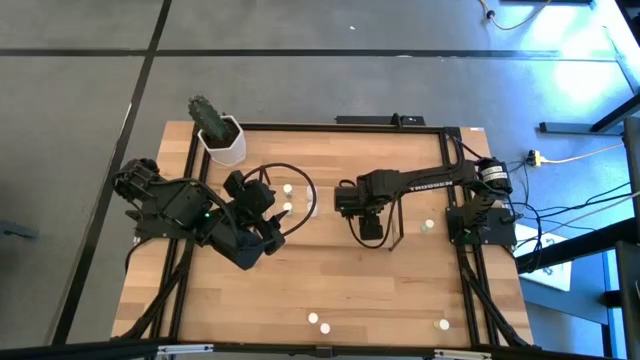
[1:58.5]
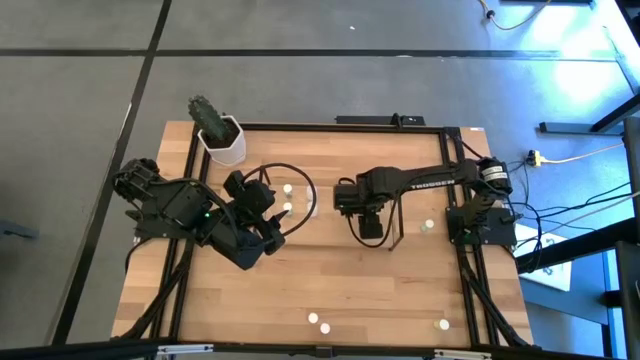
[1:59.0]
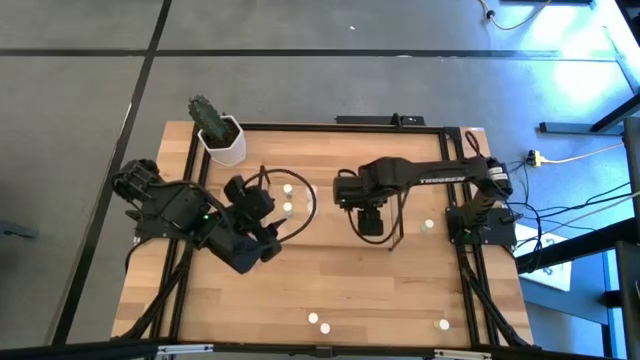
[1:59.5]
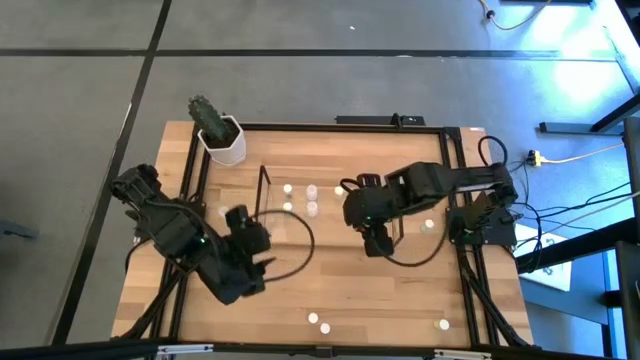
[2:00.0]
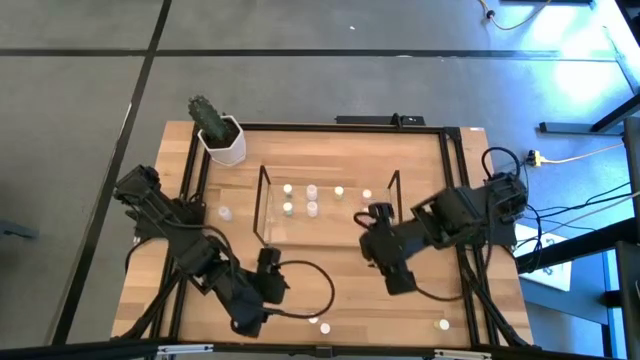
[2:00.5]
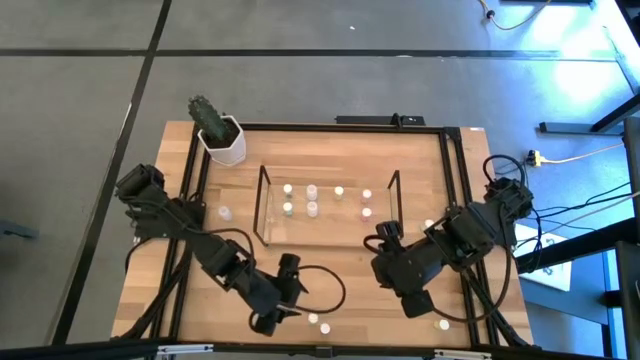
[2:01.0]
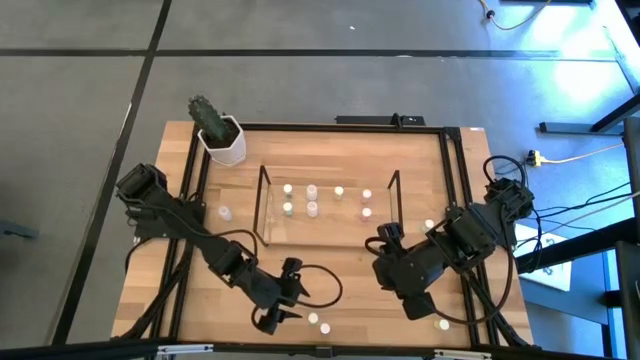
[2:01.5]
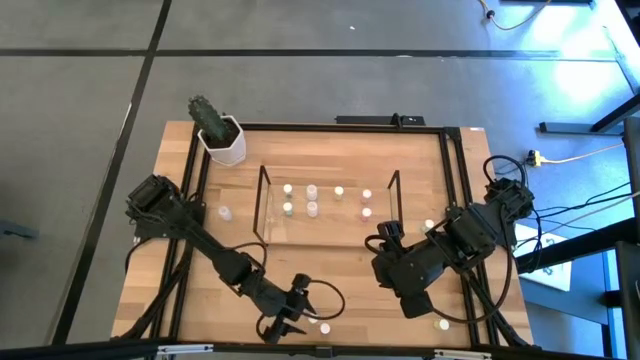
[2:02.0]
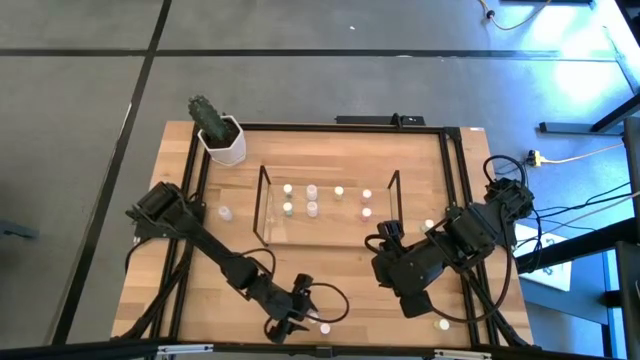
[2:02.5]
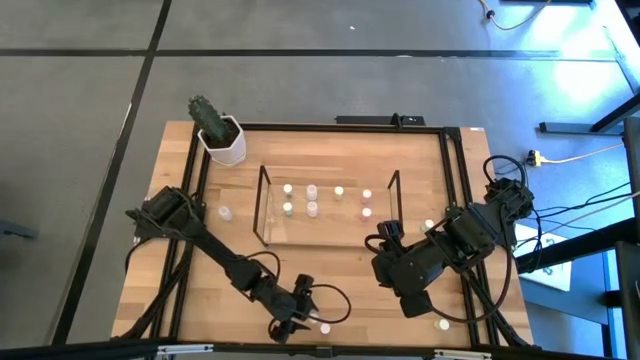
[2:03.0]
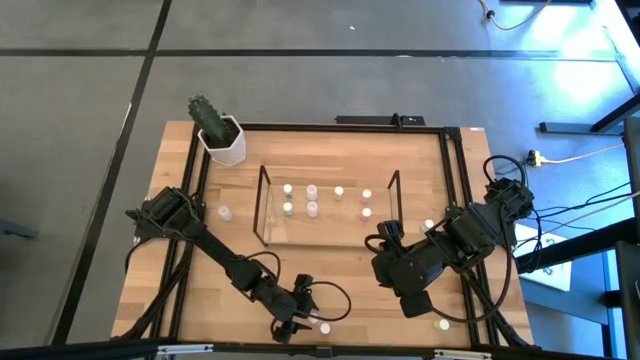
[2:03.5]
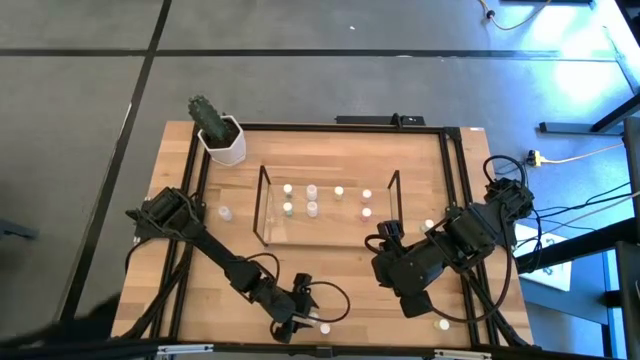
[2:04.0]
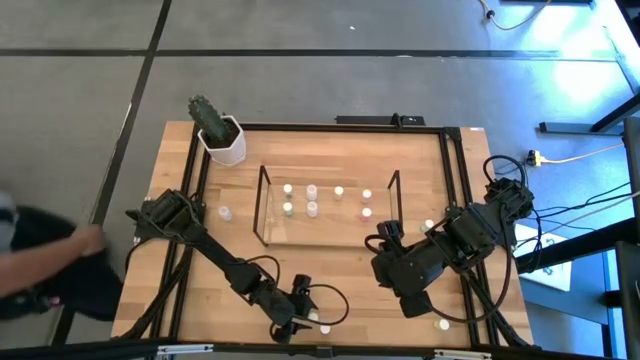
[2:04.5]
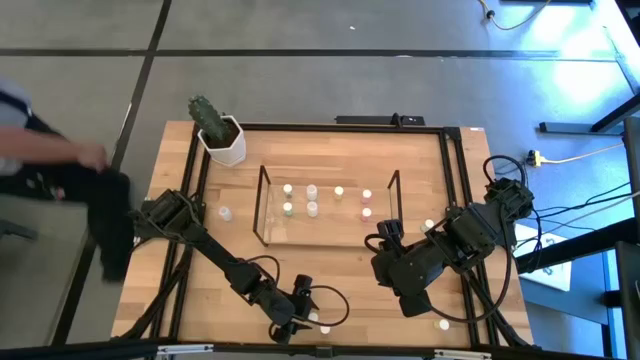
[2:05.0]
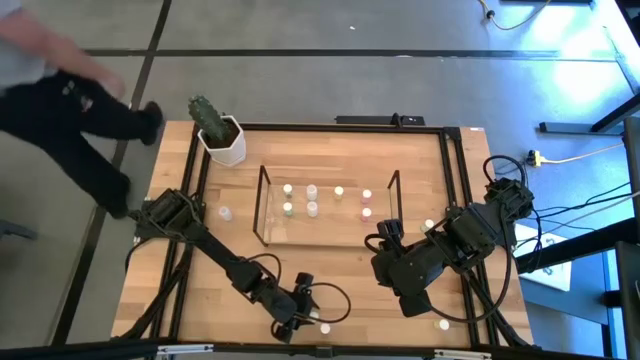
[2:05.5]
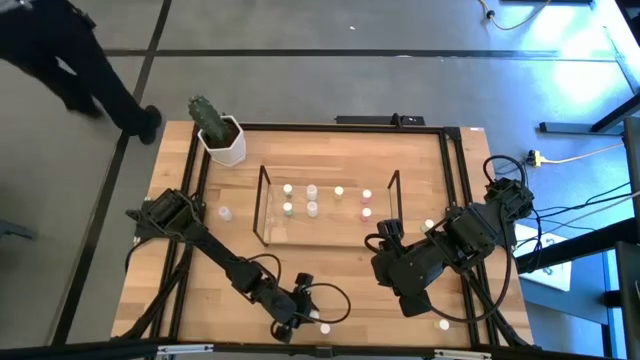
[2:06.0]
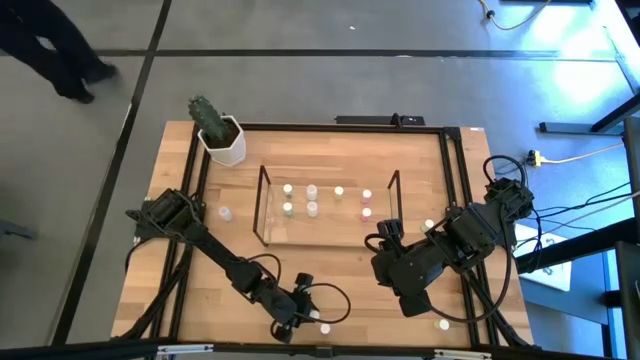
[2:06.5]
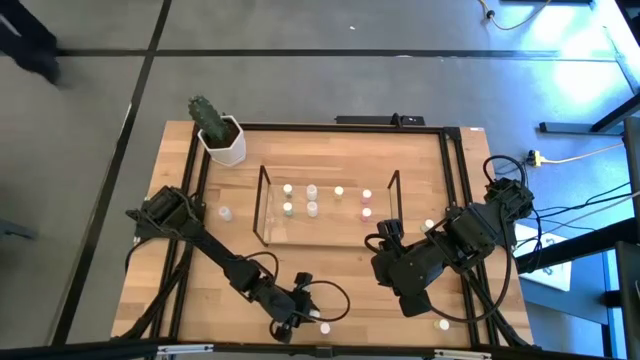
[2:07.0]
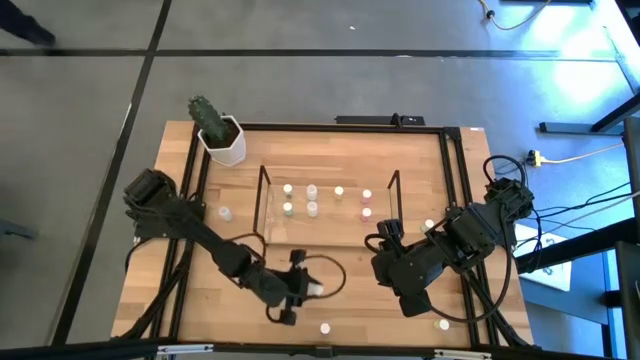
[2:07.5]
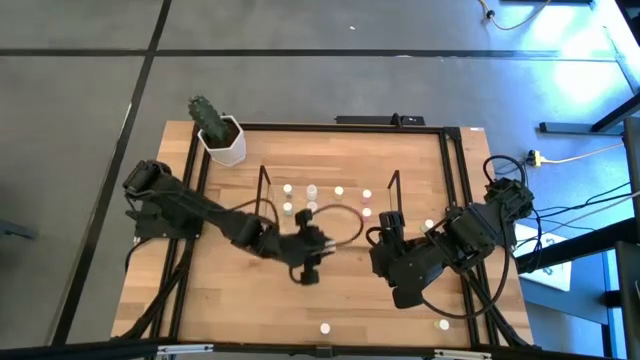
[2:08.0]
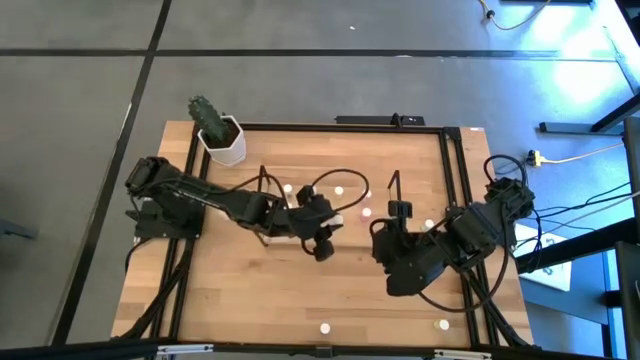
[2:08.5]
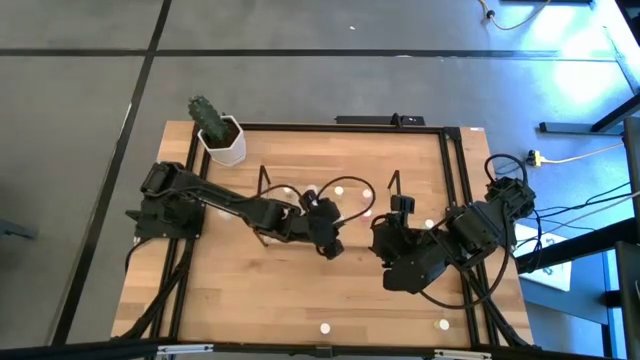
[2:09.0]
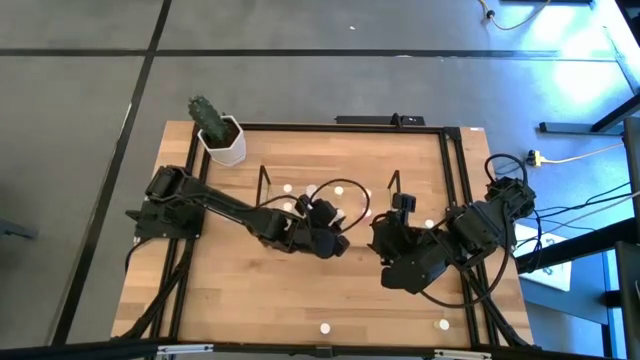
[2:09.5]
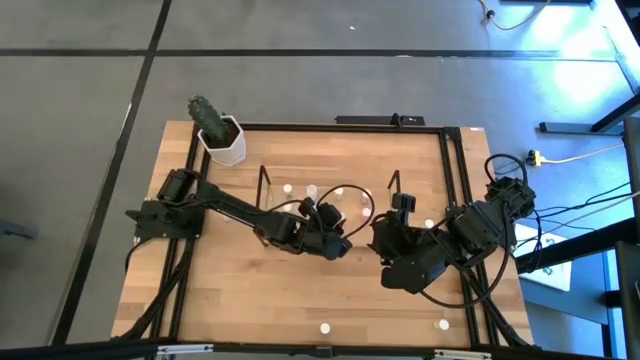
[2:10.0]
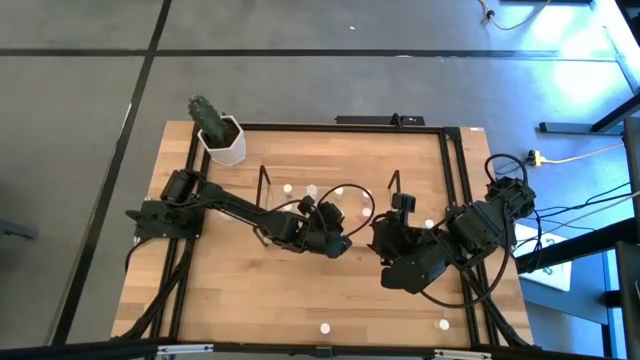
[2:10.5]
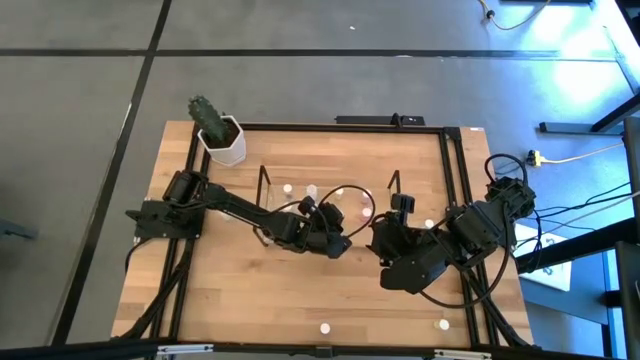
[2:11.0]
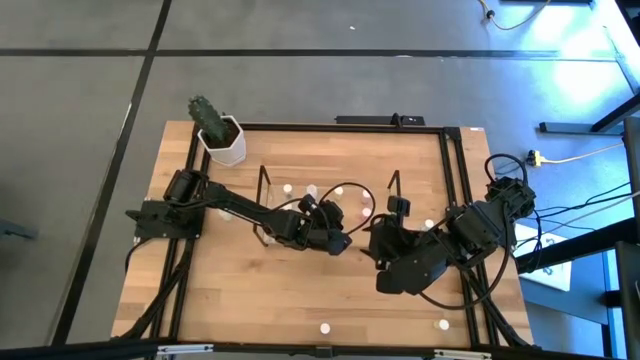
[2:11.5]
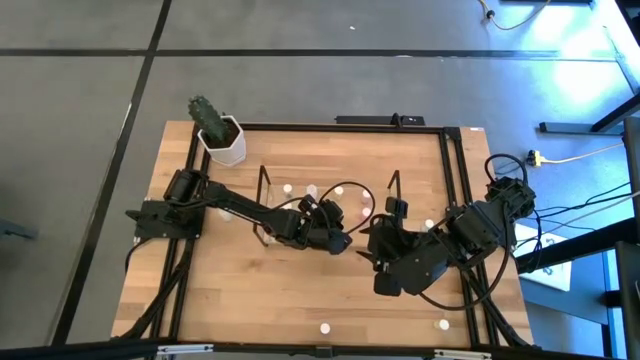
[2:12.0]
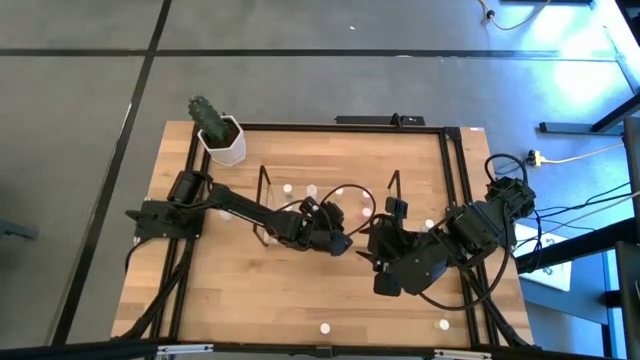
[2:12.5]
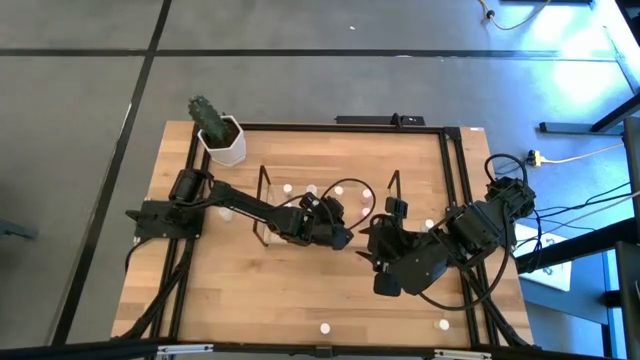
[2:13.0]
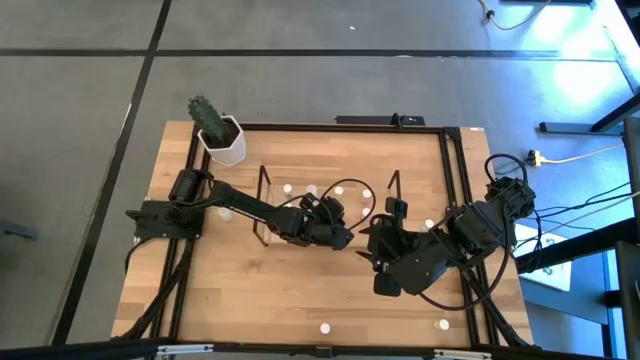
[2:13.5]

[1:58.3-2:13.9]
Task: Pick and place medicine bottles onto shelf by color
Put the left yellow pill bottle aligned with the other yellow pill bottle on the shelf

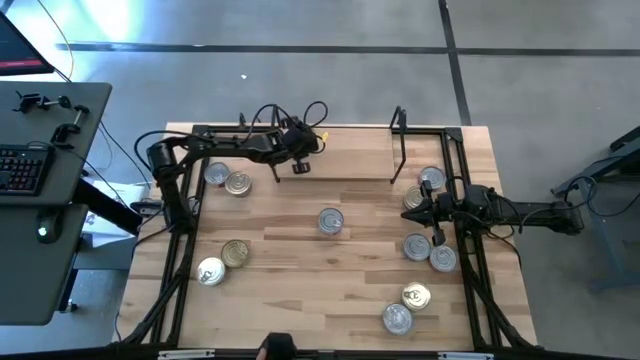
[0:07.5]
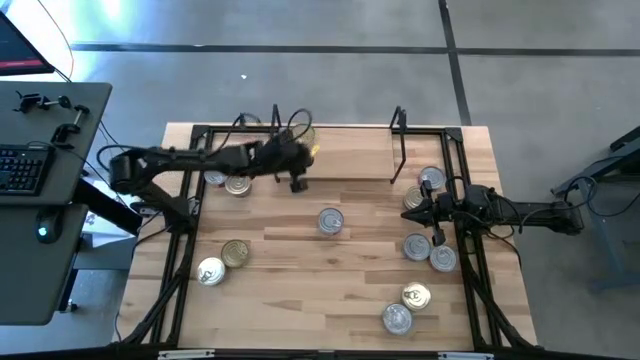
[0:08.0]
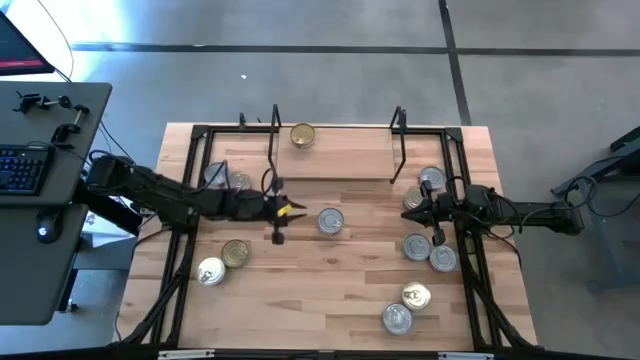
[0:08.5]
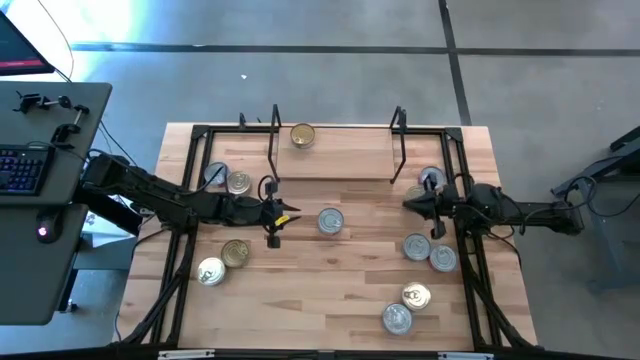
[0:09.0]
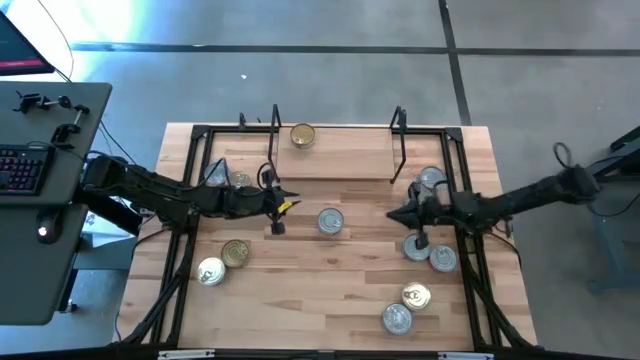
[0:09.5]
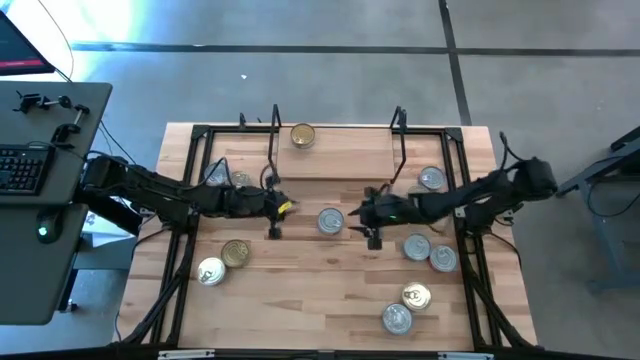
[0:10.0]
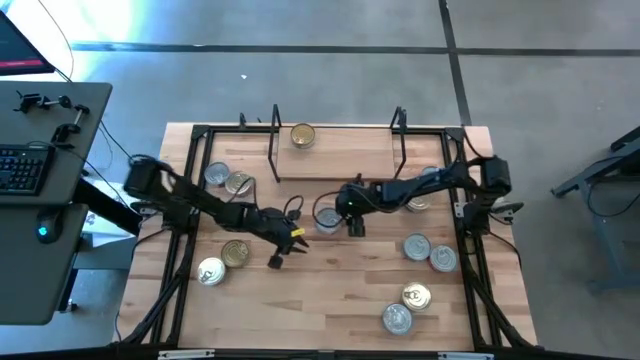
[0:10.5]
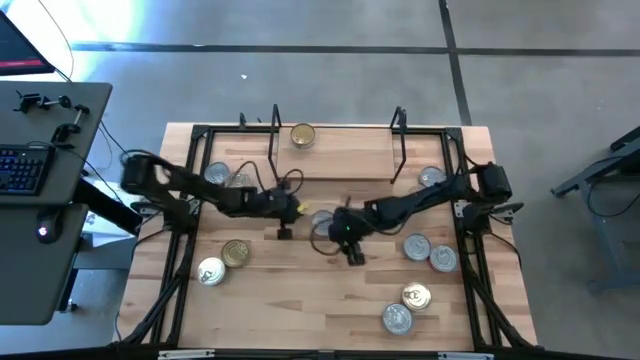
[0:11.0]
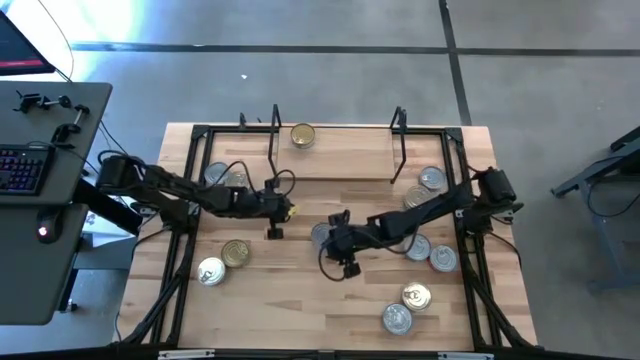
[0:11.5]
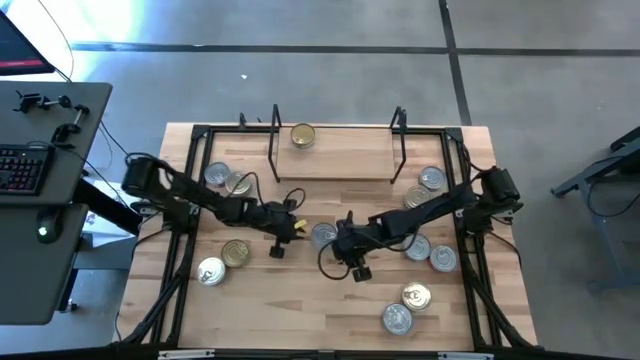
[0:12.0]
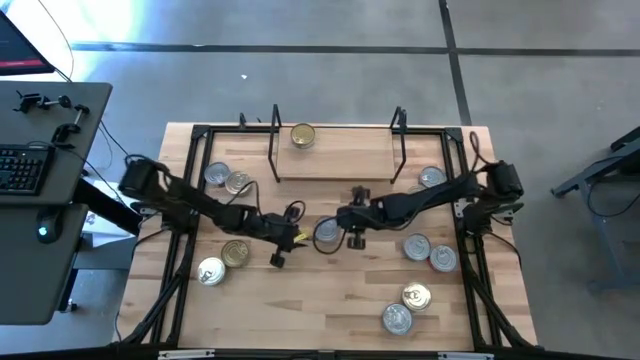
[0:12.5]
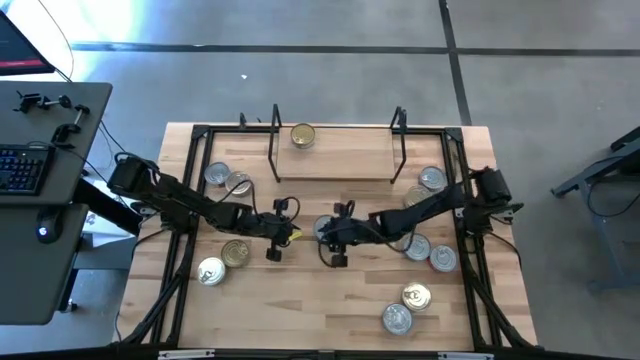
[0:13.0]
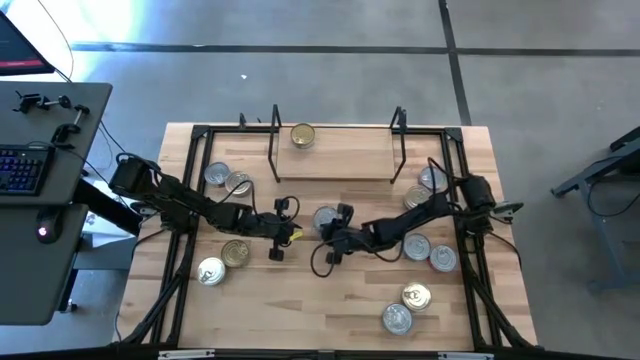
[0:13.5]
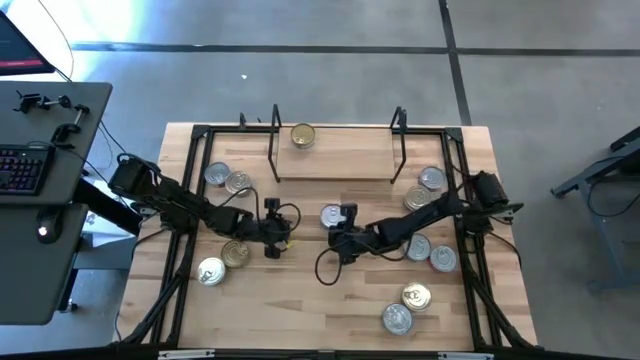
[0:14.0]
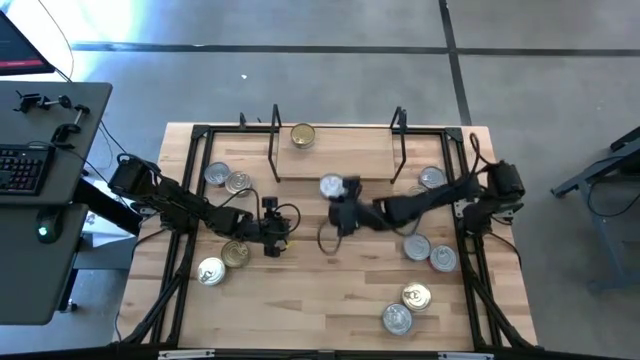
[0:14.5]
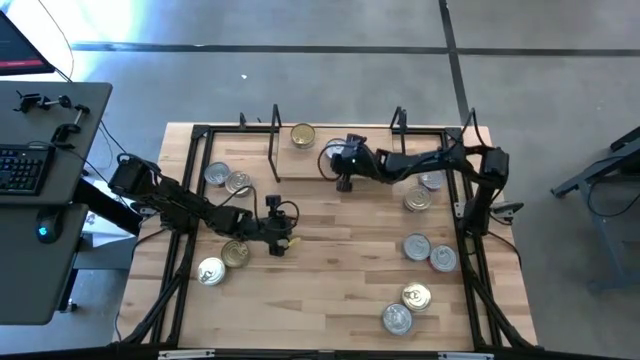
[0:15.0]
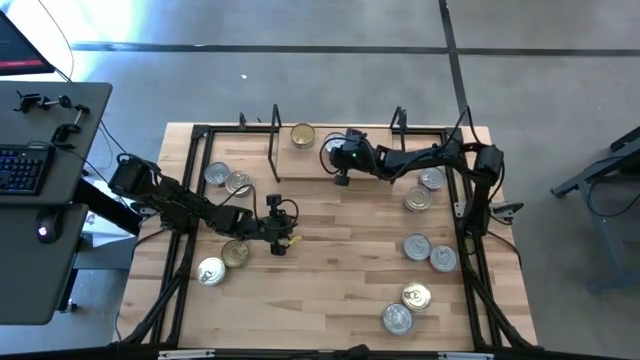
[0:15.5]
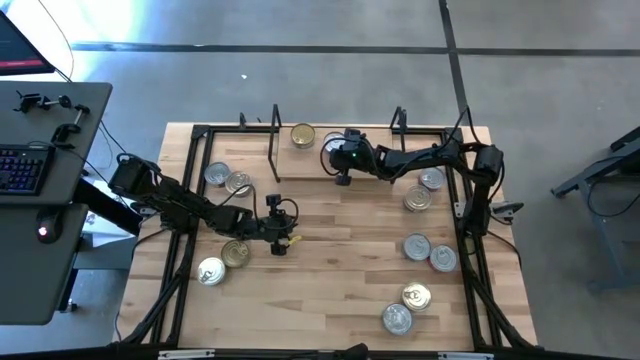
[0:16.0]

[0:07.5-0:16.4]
Task: Stack canned seafood by type on shelf
Put the red tuna can on the shelf
